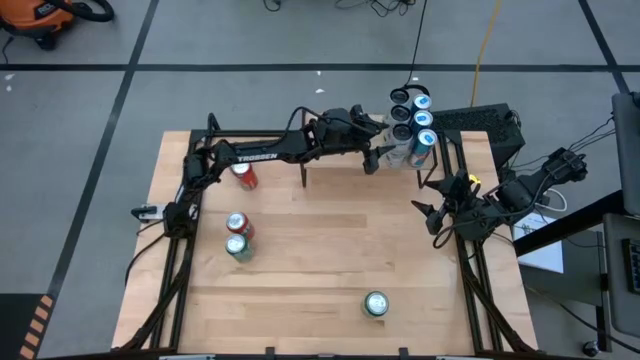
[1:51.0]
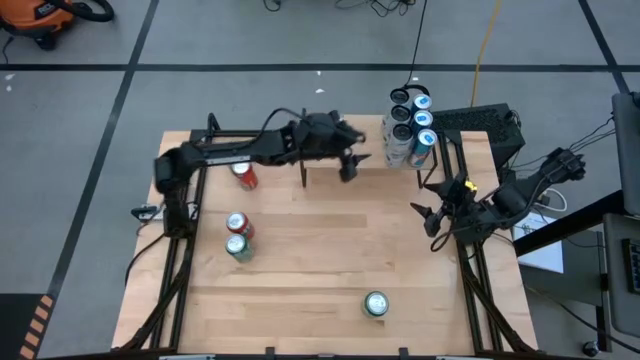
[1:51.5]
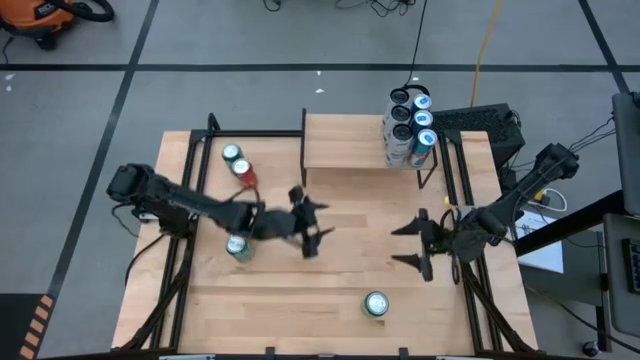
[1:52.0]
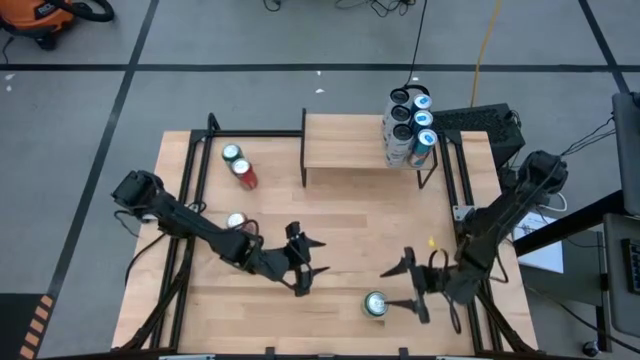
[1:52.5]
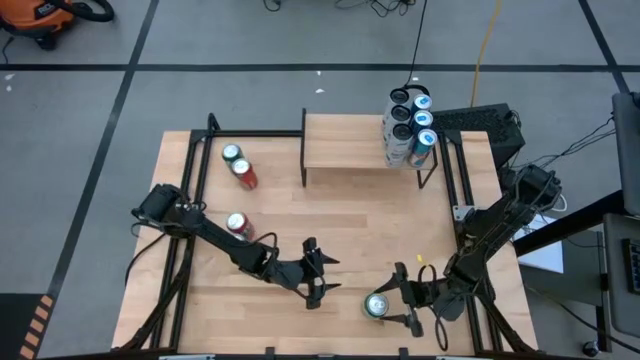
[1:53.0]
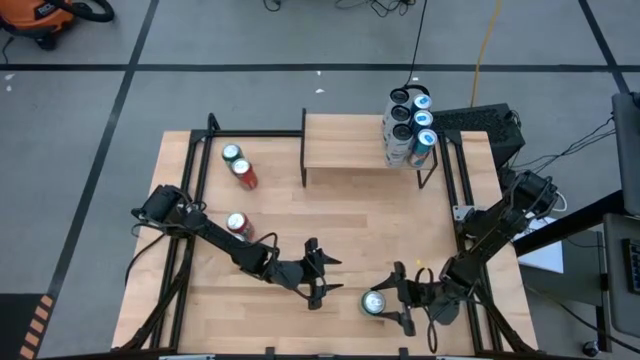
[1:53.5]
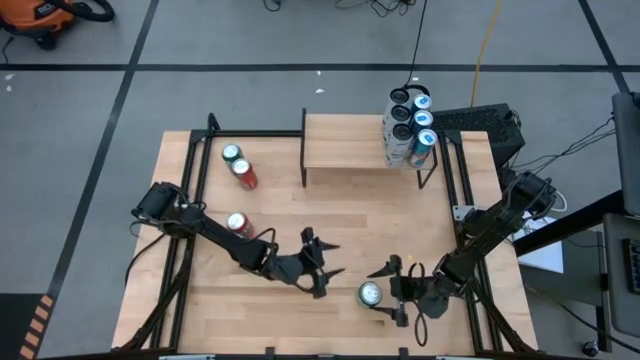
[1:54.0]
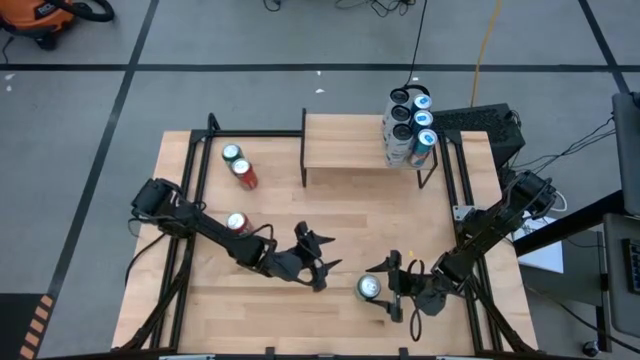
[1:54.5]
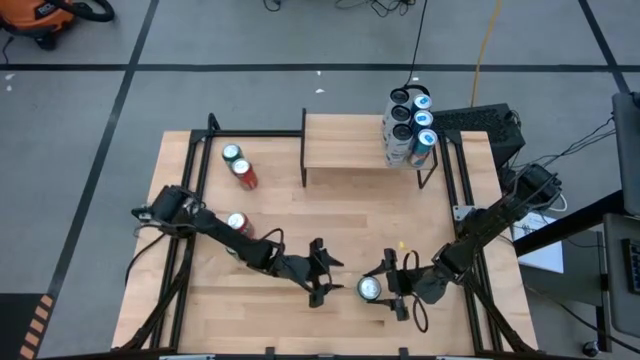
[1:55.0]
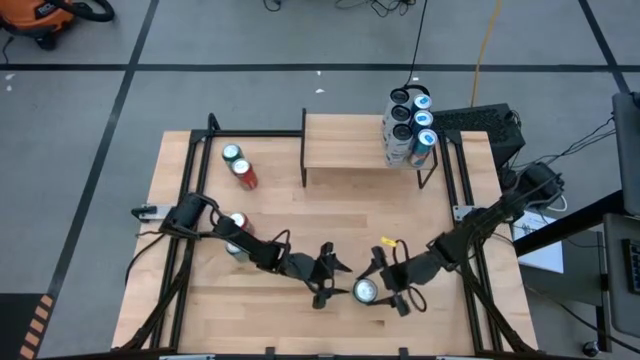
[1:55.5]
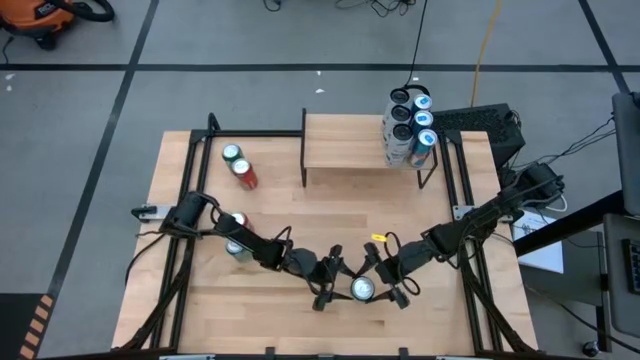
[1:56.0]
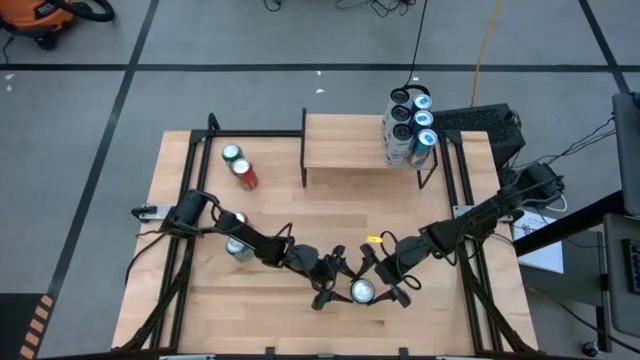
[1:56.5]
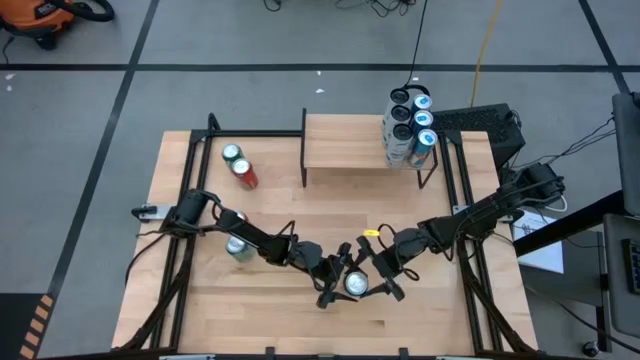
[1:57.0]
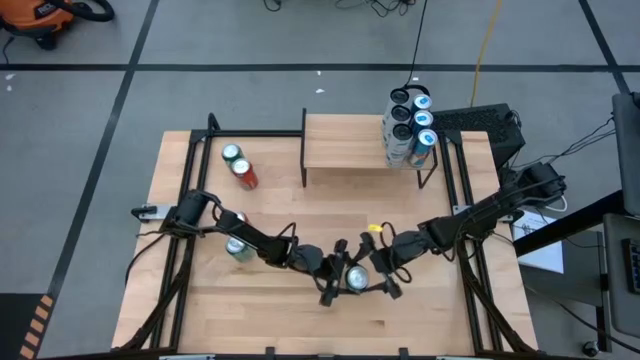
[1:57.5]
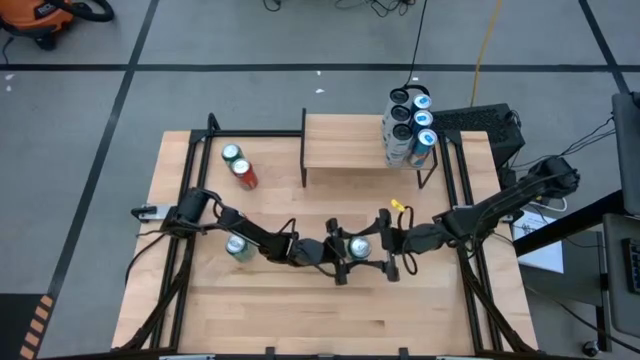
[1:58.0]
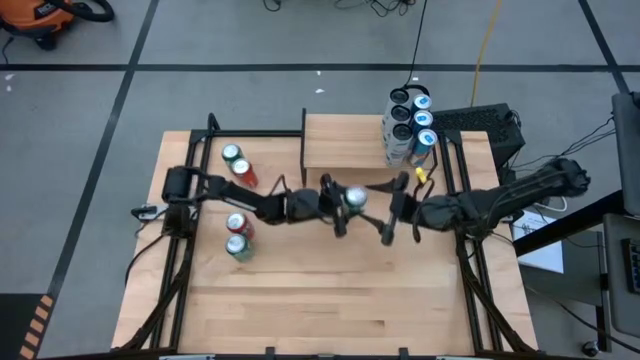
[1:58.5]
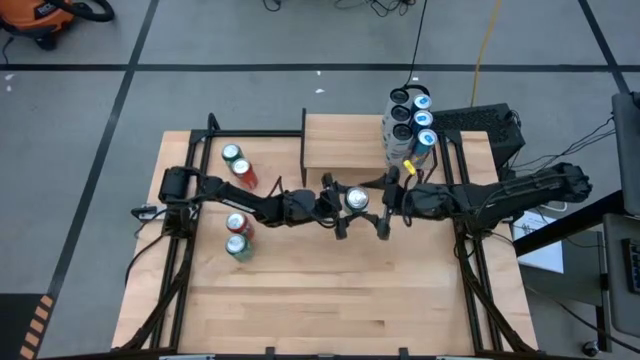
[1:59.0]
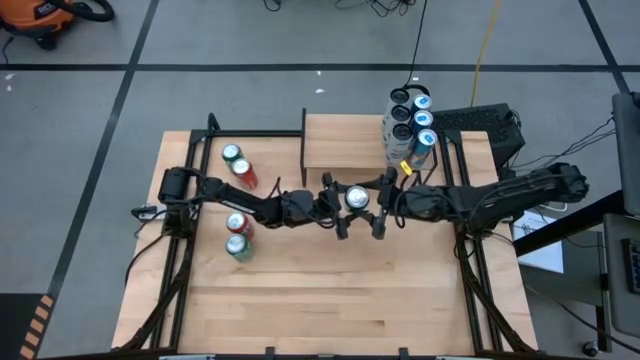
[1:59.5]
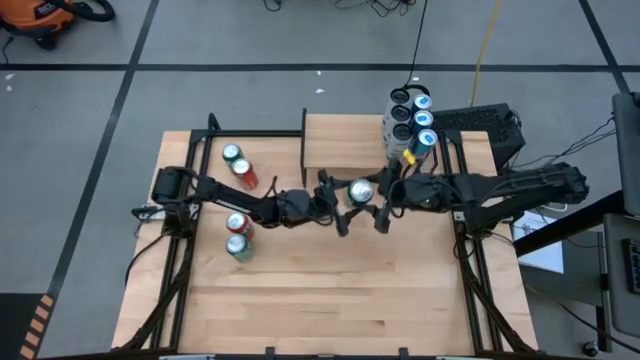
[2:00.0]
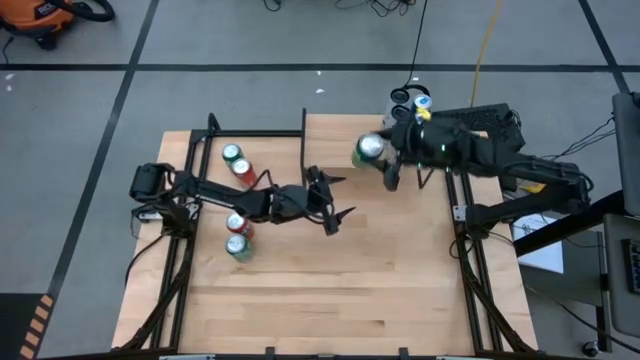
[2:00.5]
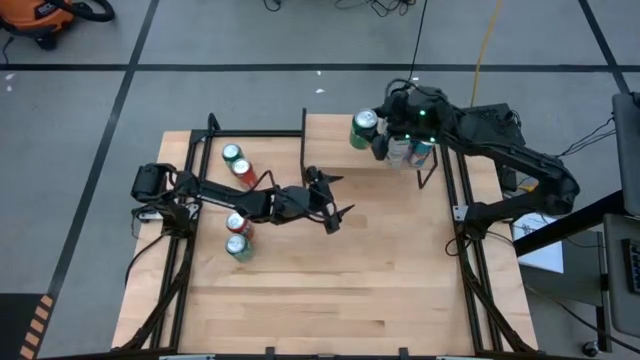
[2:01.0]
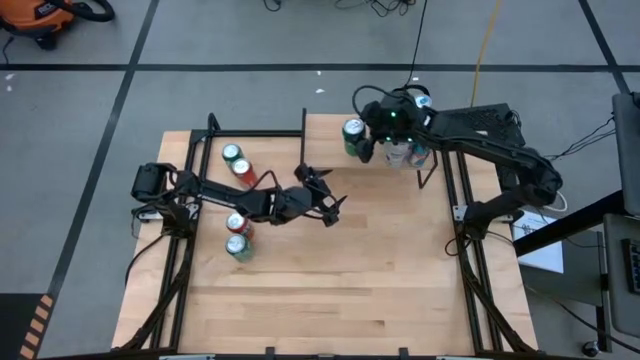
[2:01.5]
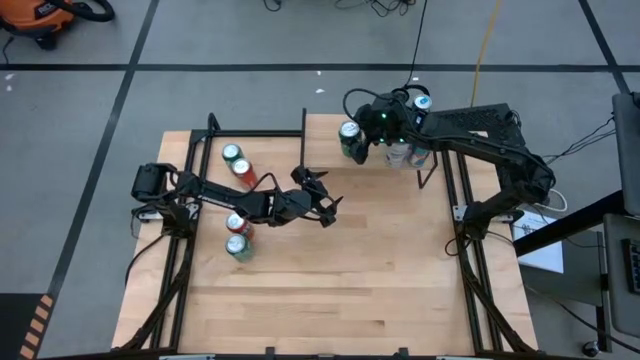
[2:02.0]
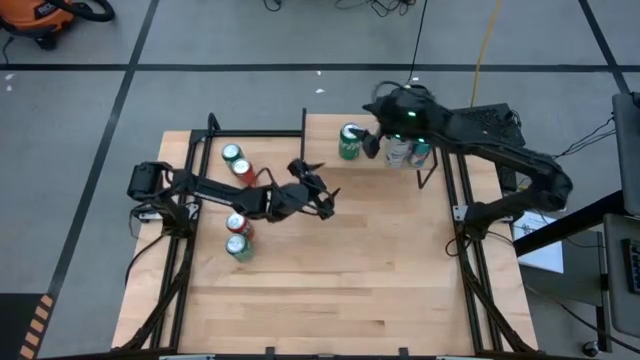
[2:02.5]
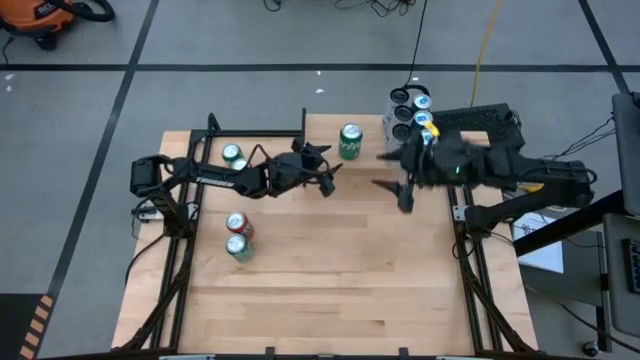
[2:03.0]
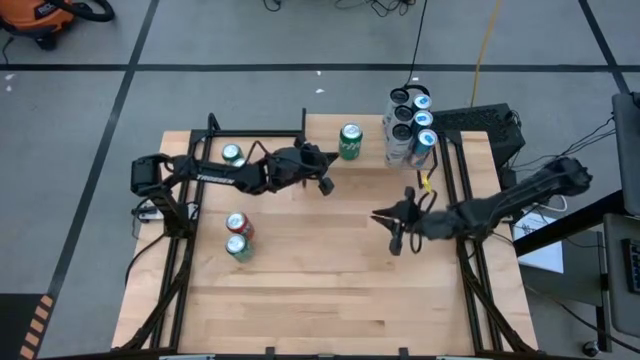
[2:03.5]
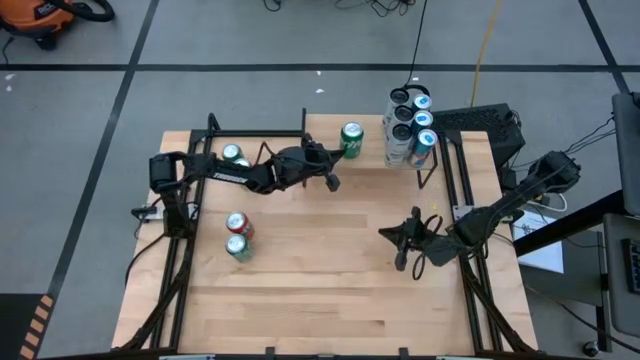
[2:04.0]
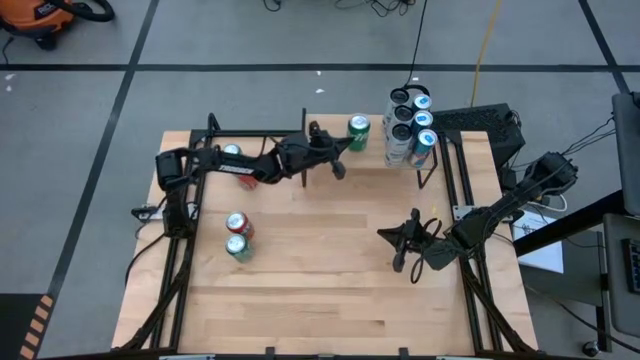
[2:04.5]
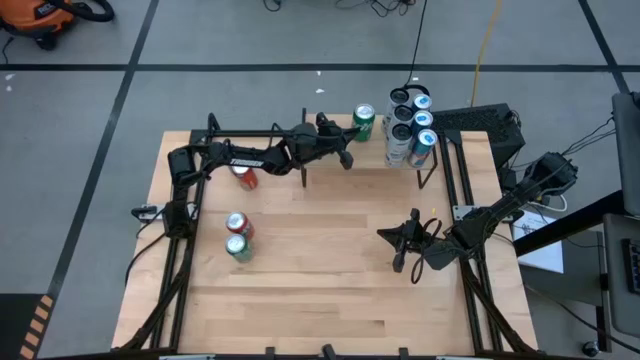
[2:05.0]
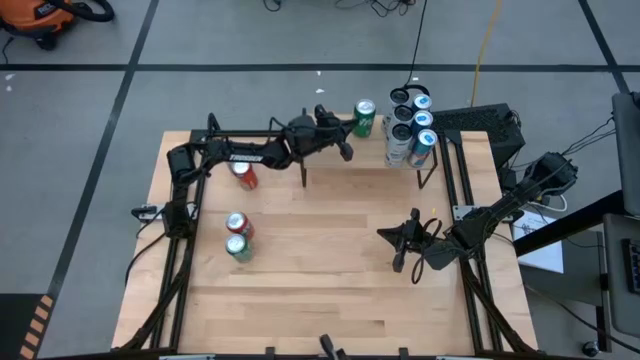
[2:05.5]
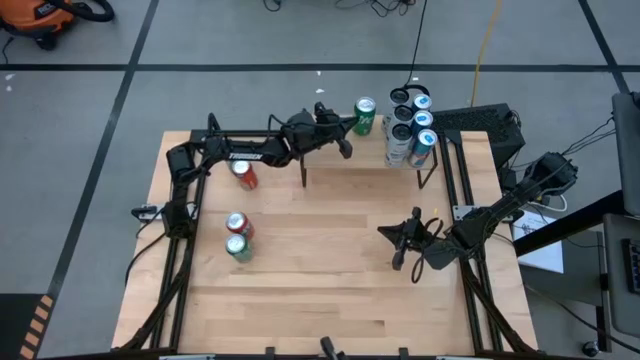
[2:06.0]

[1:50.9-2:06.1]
Task: Place canned beverage on shelf
Put the bottom green soda can on the shelf

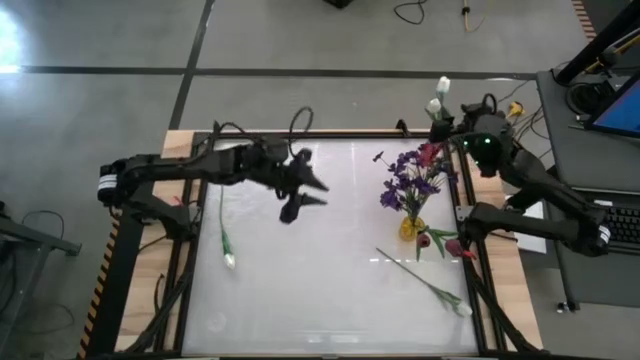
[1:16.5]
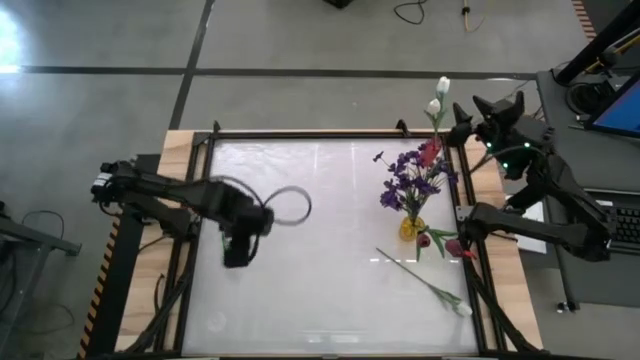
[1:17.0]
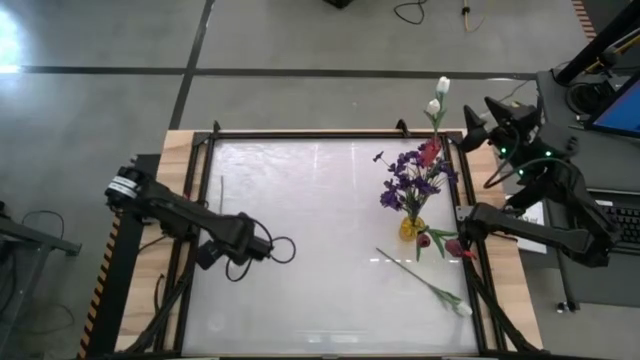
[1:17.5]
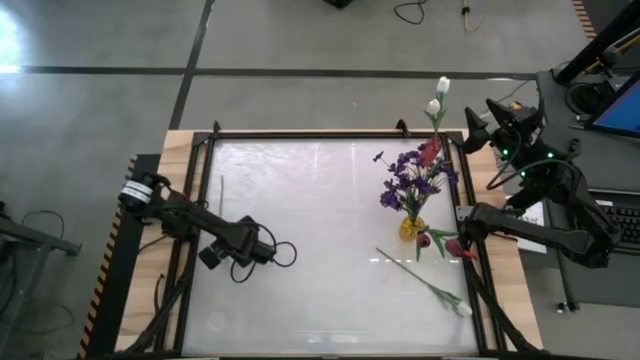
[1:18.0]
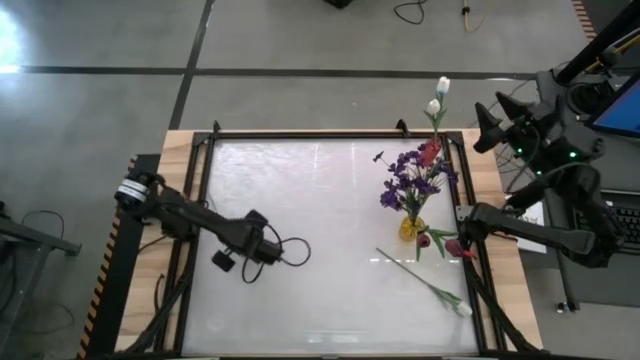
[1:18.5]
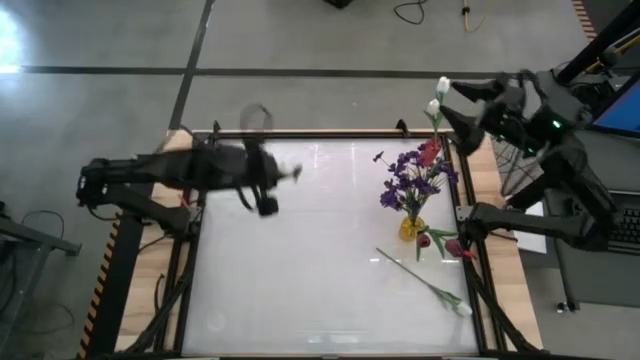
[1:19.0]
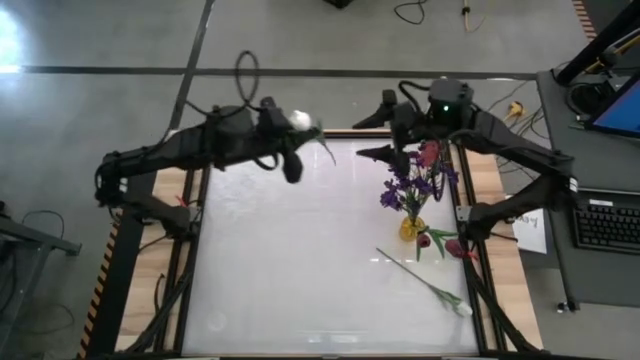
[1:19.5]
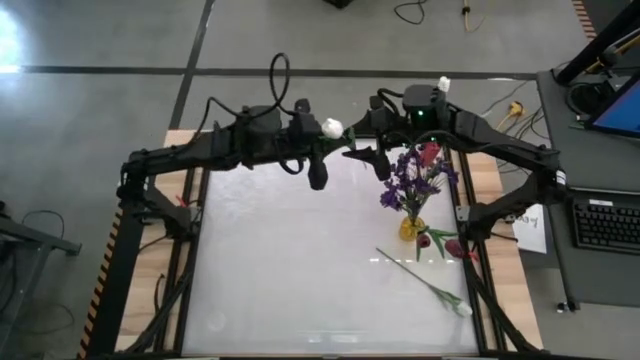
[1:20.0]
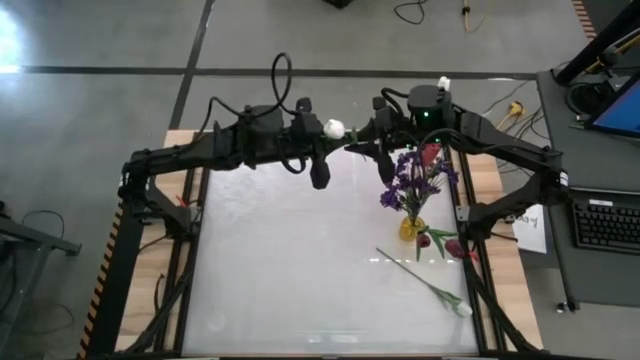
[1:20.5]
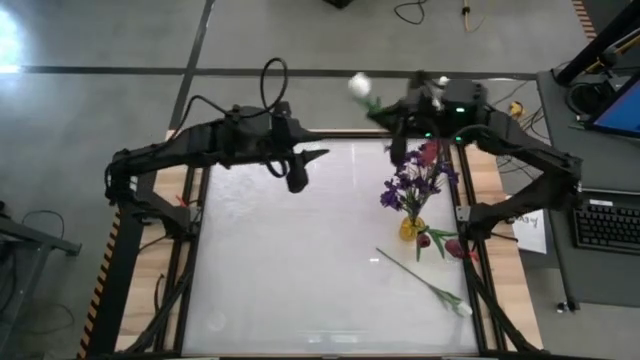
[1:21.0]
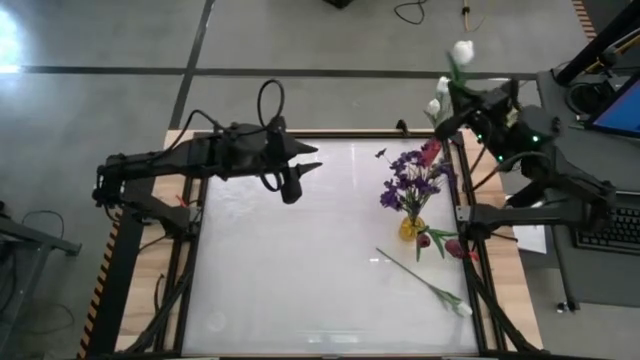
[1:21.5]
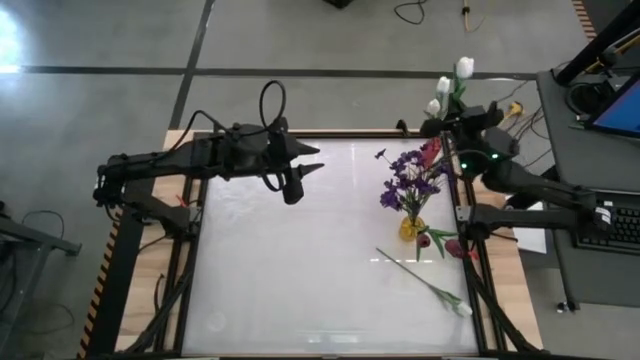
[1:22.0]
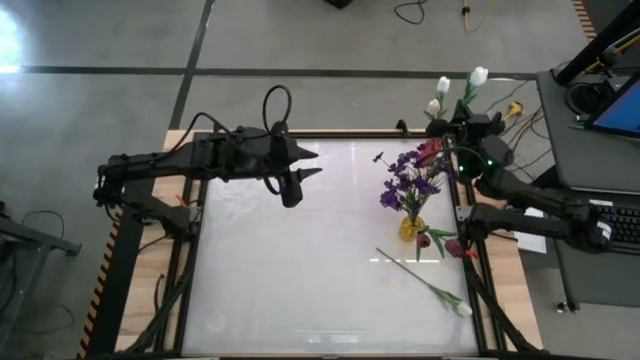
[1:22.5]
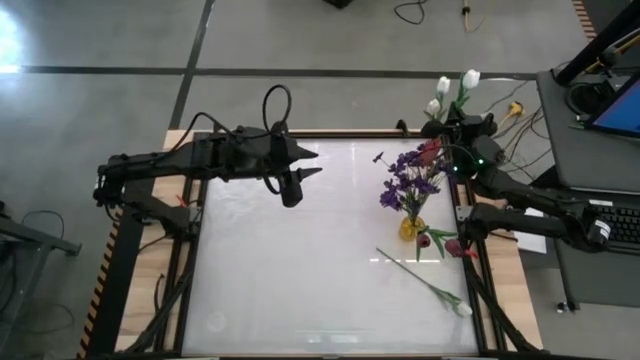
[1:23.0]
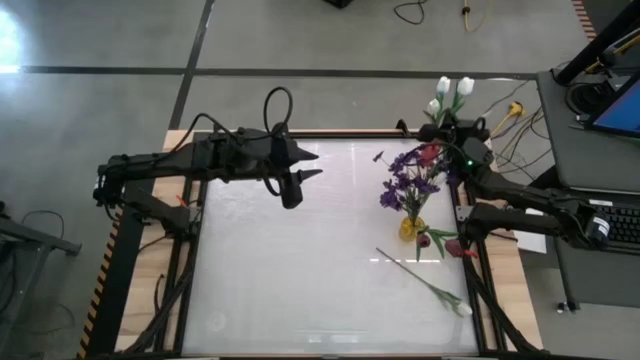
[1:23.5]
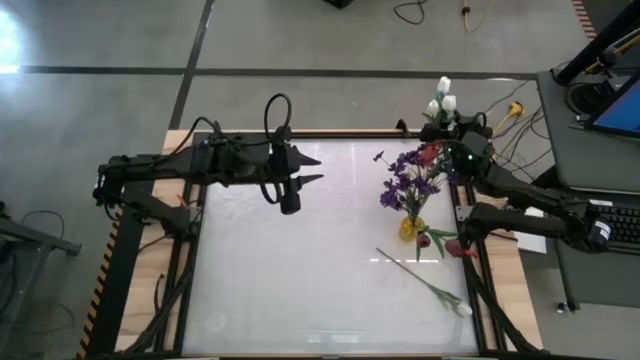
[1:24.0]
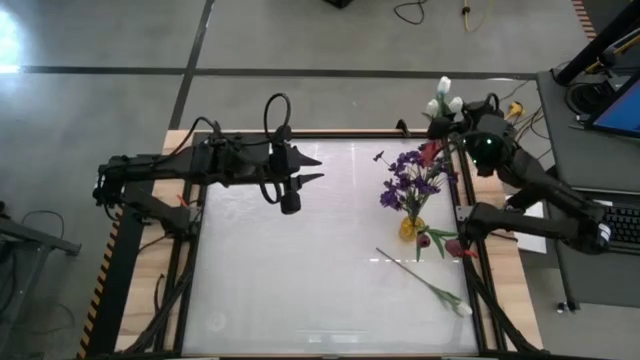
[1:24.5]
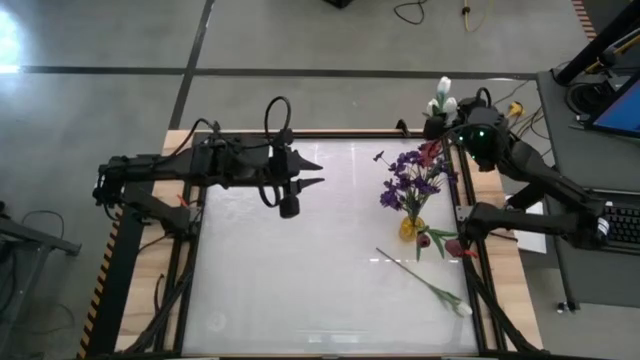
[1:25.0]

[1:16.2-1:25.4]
Task: Sort flowers into vase by color
Put the left white flower into the red vase
